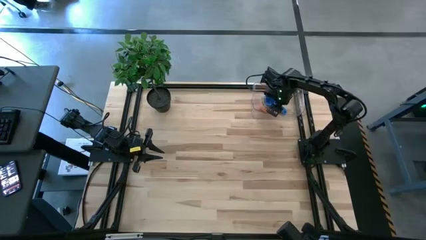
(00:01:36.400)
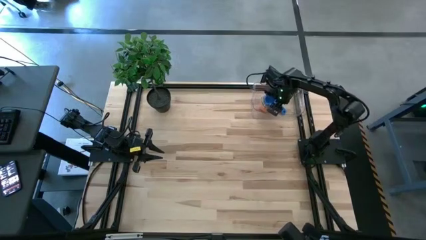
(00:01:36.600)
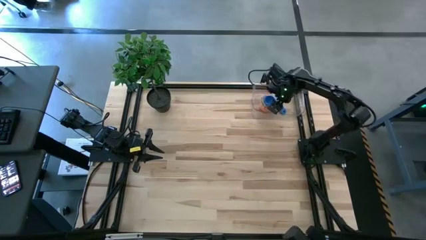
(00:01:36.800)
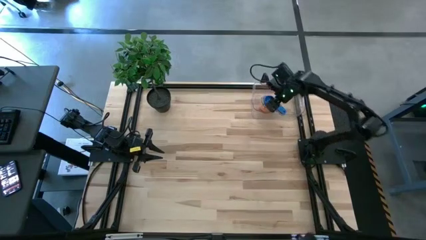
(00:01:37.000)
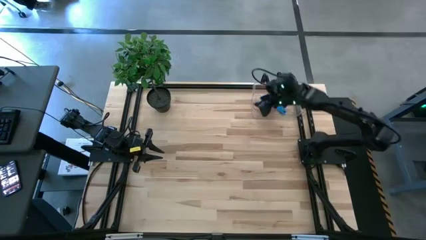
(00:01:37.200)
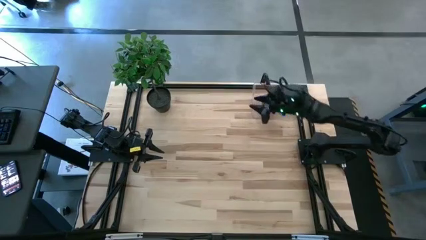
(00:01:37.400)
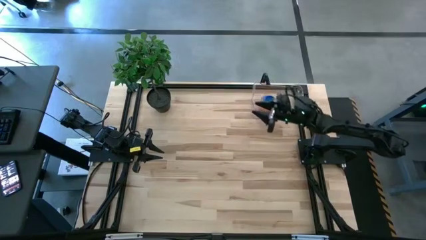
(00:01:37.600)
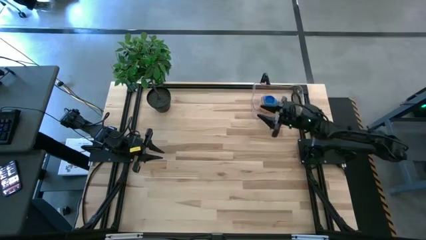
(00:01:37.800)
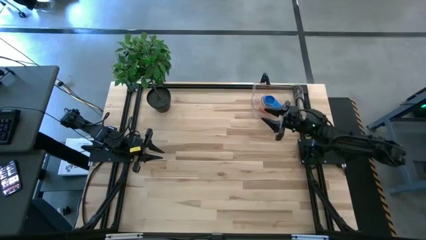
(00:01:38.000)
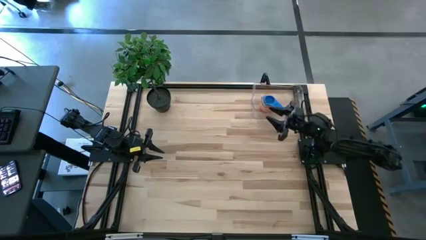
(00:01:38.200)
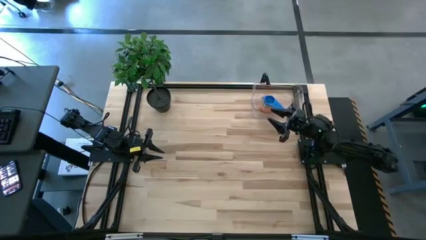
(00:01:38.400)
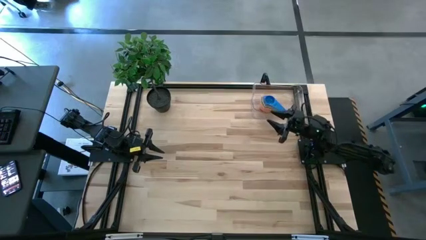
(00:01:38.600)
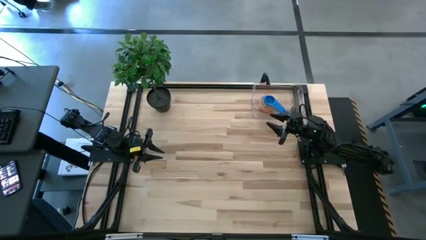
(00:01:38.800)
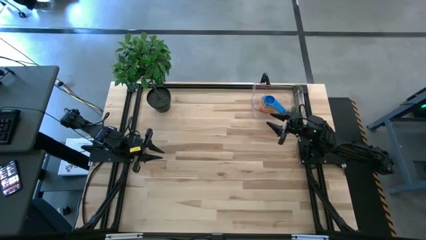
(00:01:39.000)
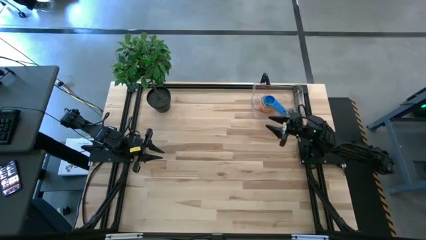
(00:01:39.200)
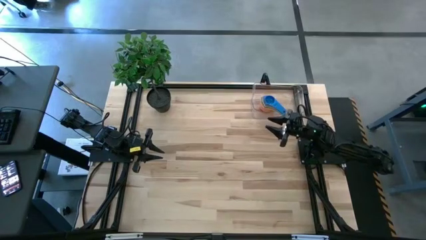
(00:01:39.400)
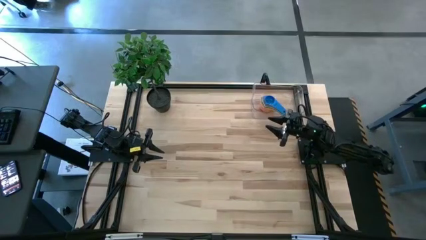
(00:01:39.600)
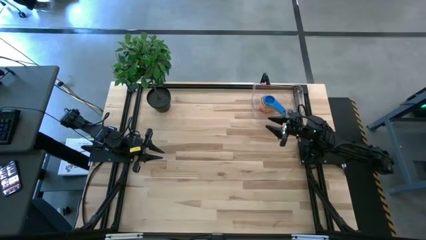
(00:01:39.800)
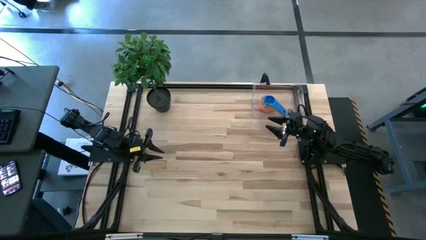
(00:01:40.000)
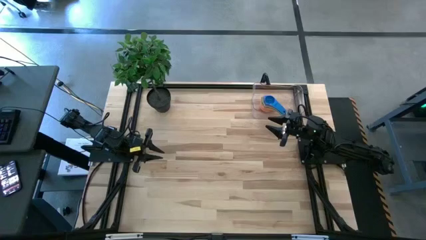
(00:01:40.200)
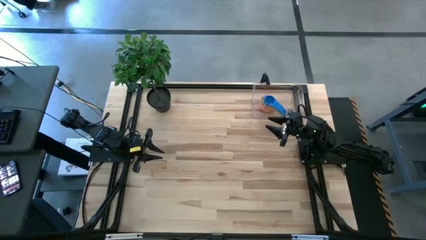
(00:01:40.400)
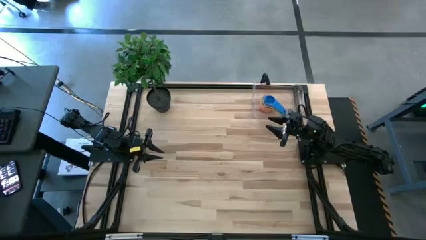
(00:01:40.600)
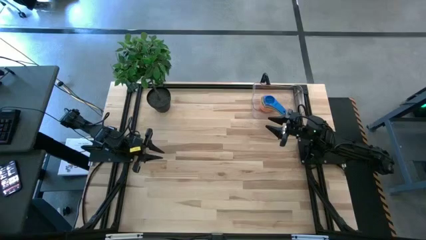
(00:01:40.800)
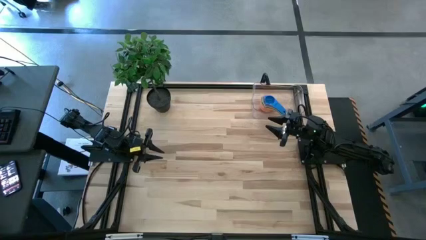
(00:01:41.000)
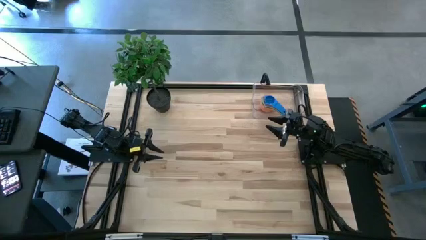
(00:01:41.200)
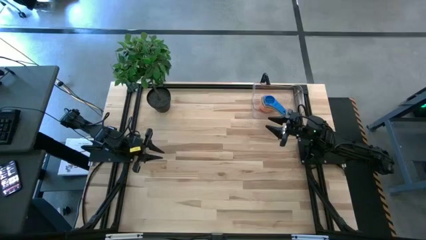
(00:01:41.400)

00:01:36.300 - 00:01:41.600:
Task: Nest measuring cups in basket
Return to home position

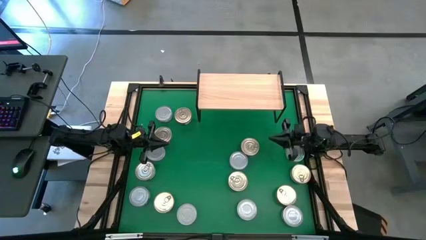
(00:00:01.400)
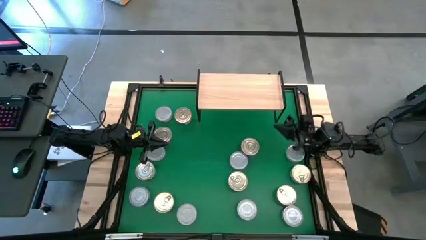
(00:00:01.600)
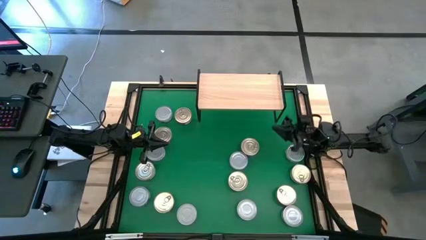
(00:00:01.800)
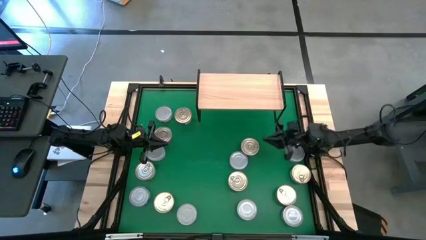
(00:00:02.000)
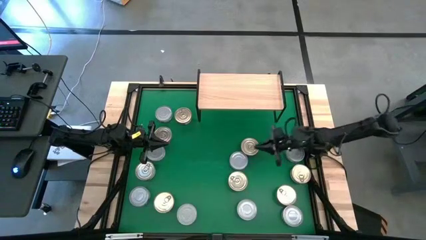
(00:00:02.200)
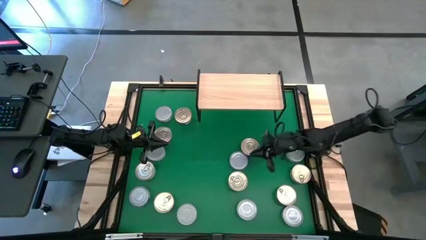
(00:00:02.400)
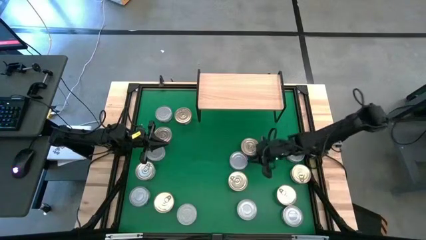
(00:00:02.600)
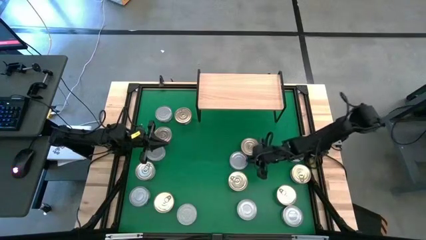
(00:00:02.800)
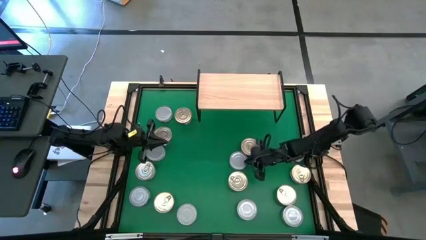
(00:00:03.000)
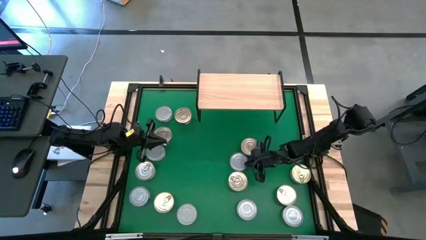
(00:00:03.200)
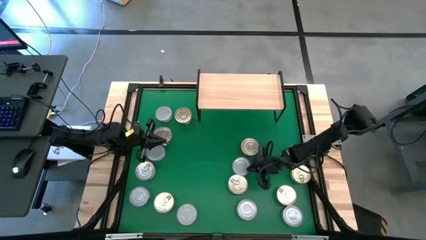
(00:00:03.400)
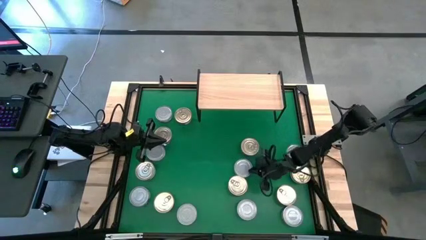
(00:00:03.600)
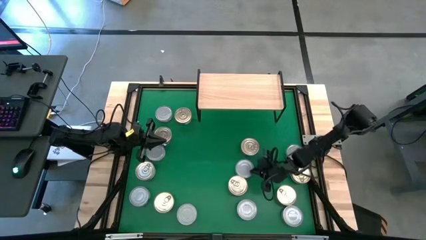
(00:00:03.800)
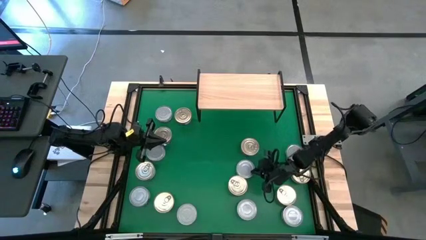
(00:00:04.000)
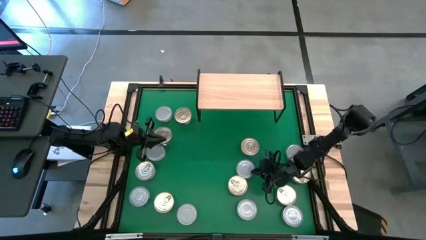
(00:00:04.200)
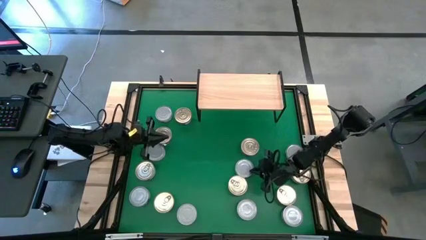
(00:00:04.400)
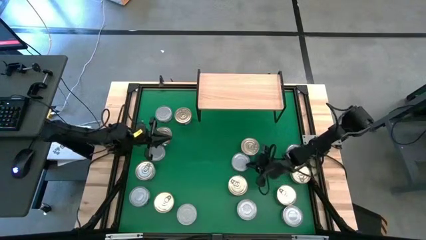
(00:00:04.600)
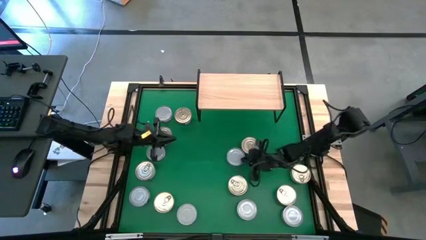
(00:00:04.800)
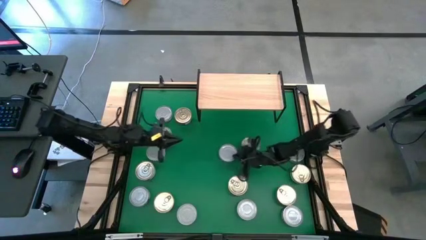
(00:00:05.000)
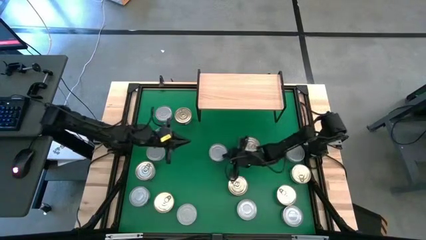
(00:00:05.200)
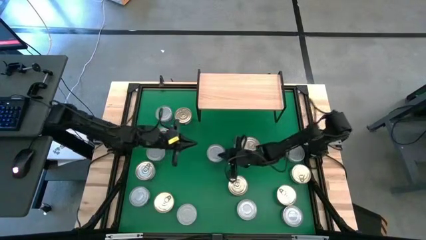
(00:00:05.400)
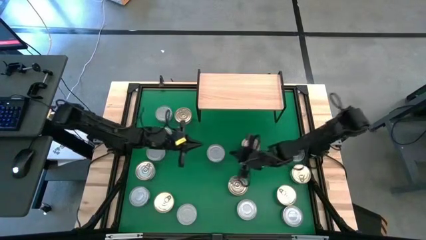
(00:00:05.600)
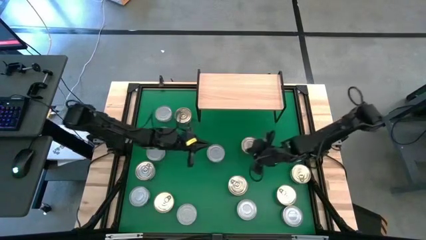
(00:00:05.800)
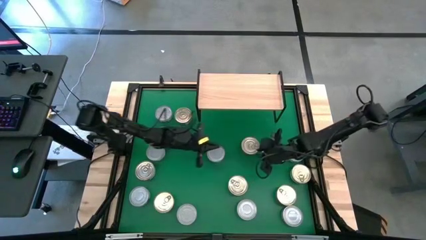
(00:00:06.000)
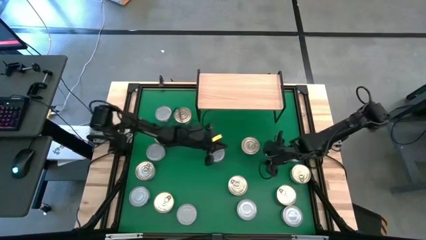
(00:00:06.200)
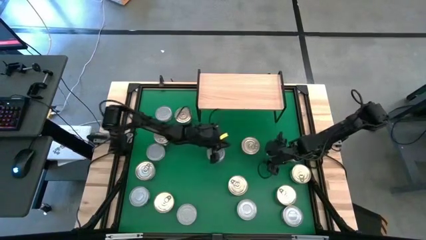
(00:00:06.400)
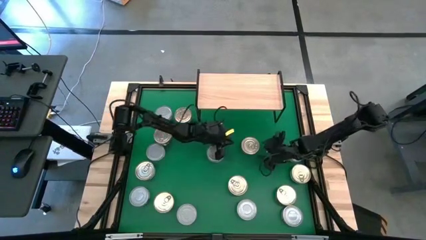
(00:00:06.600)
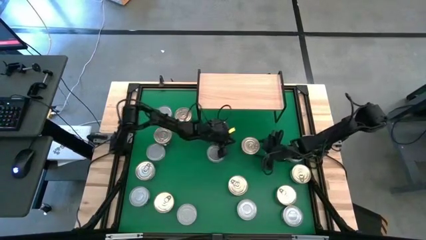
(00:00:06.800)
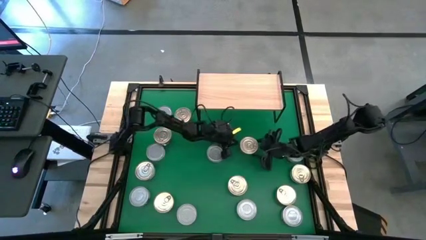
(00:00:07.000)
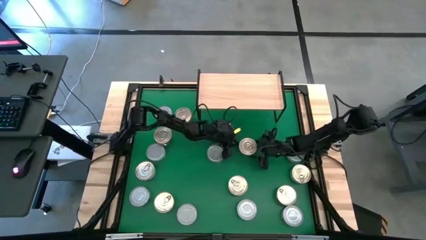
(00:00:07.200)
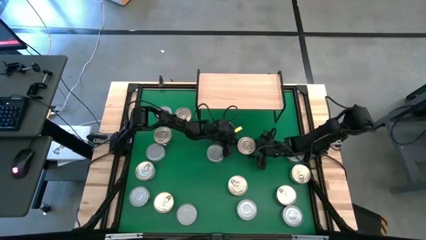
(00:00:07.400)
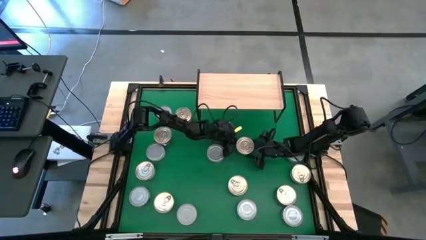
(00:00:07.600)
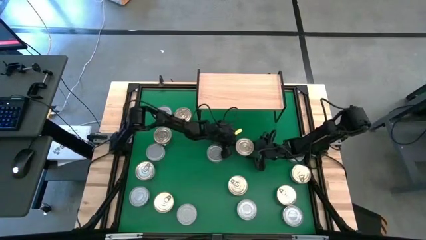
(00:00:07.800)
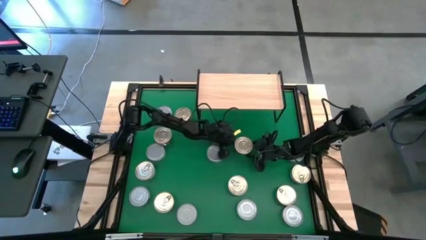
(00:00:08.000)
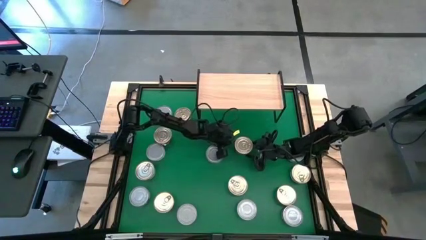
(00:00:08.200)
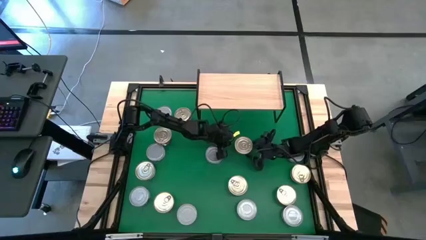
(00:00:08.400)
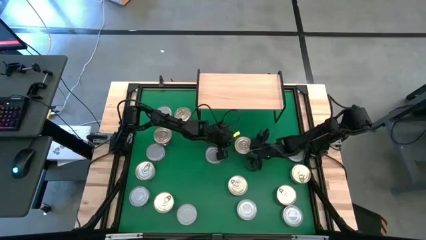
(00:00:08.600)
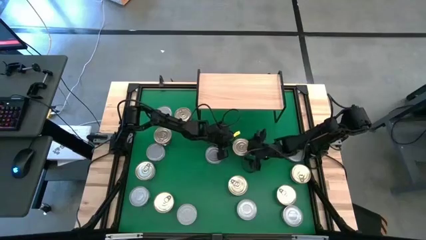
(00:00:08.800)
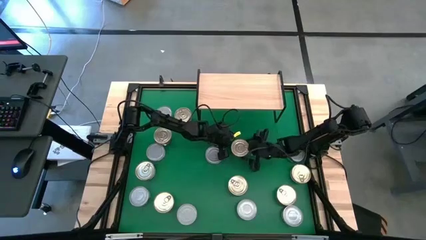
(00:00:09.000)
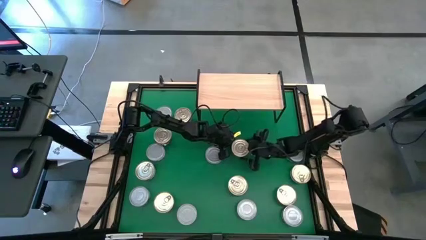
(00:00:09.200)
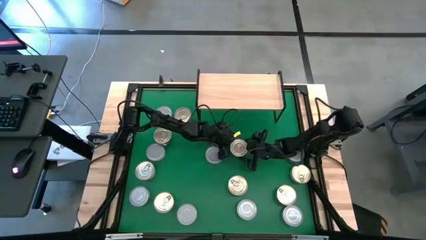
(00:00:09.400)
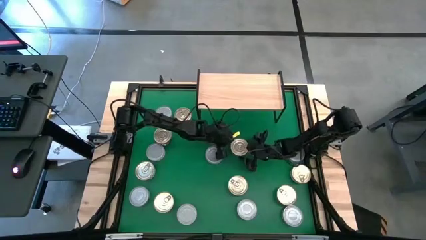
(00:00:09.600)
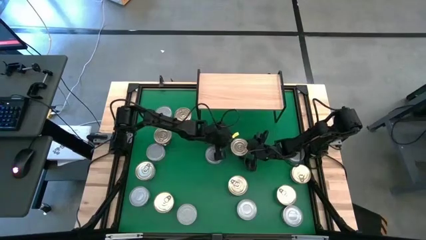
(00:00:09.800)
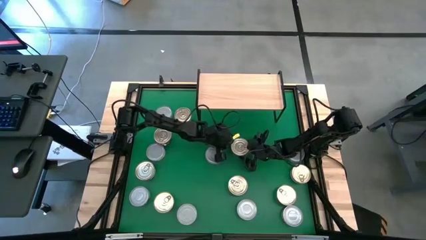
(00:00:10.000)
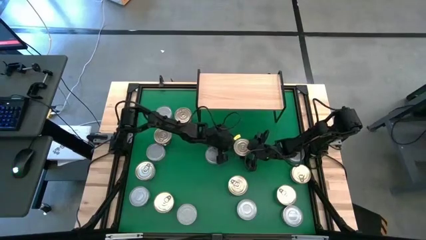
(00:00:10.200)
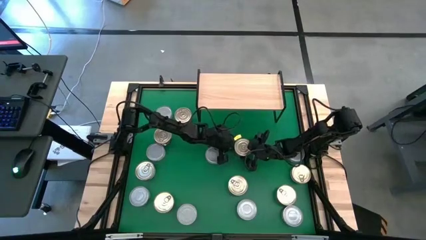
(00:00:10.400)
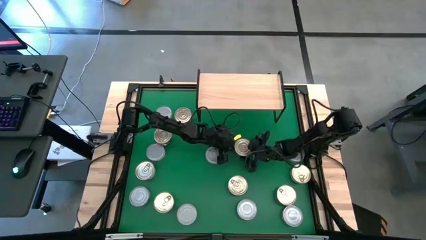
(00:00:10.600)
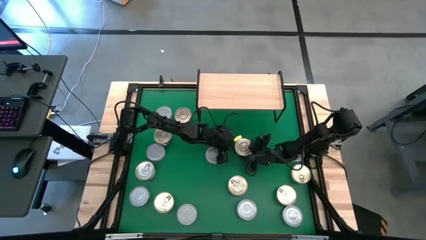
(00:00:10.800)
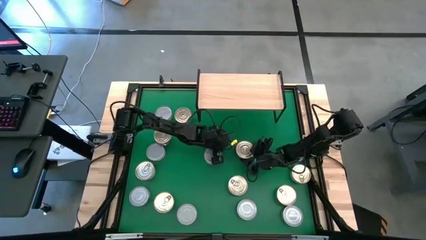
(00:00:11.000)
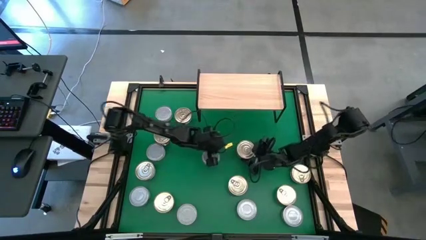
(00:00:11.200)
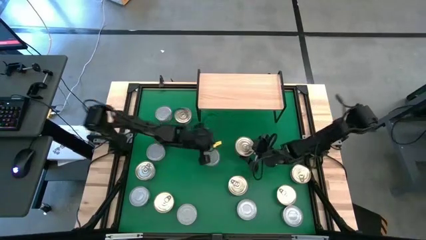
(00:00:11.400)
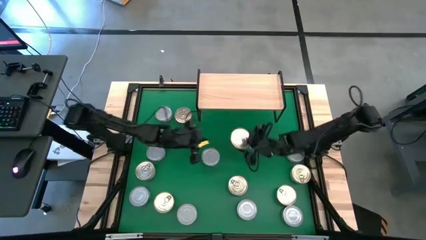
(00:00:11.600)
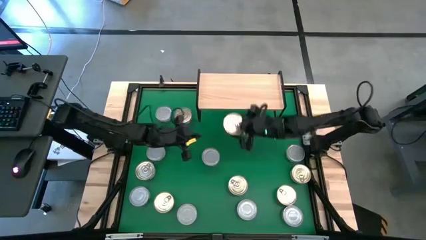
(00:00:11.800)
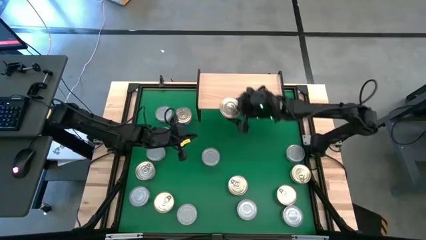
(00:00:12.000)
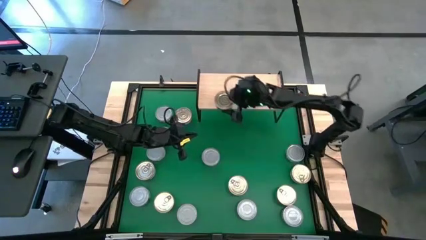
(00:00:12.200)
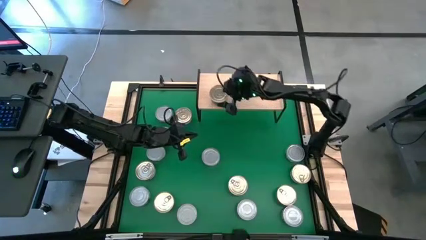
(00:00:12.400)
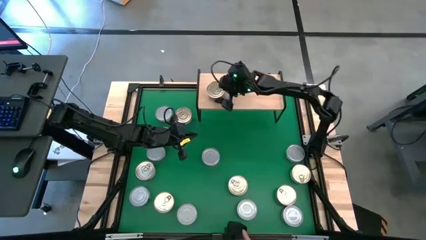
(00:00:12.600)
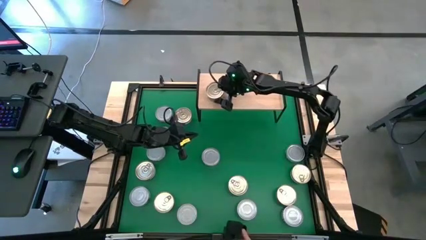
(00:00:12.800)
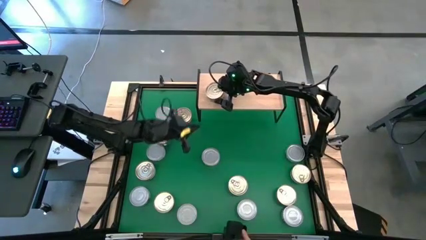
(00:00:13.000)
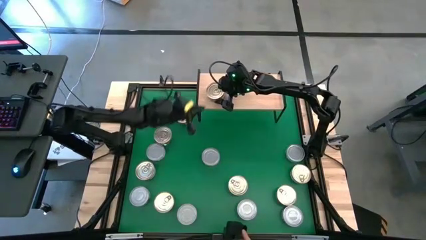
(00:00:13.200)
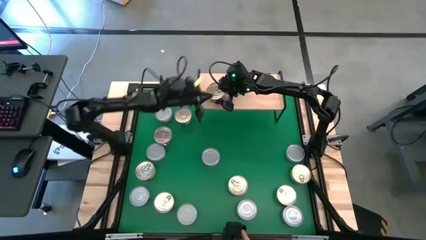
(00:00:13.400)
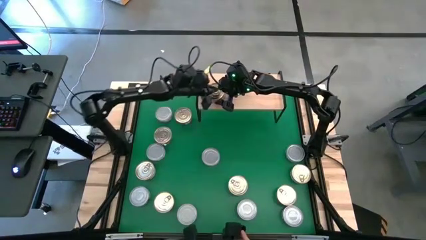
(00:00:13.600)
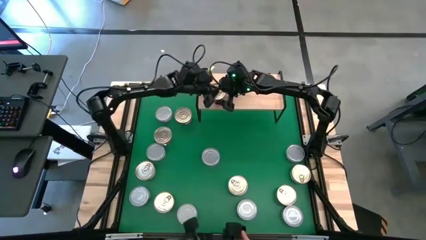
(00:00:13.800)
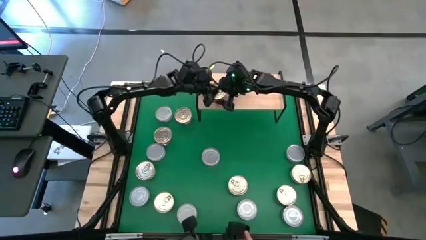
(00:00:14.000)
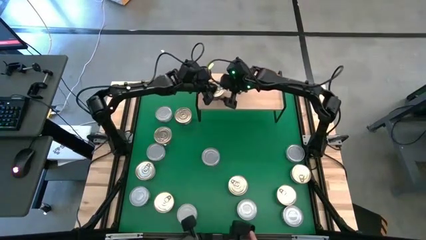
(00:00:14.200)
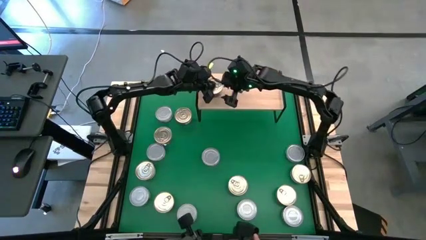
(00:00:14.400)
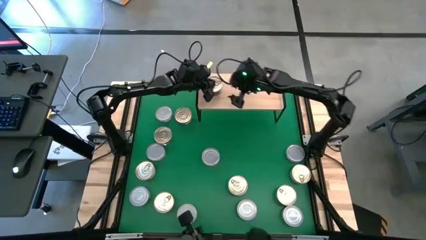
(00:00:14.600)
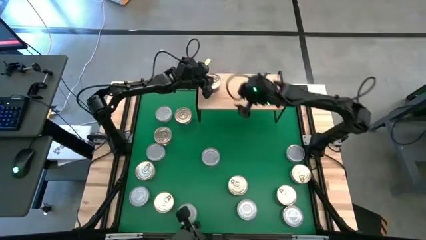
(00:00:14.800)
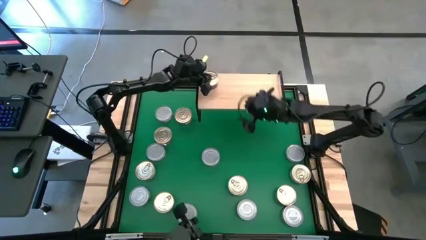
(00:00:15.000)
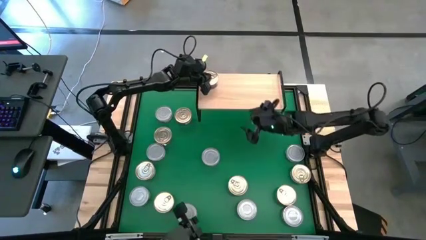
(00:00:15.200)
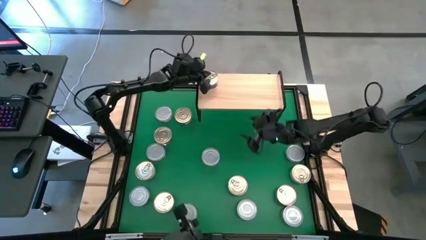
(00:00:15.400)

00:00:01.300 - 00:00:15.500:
Task: Stack canned seafood by type on shelf
Put the blue pink tuna can on the shelf
